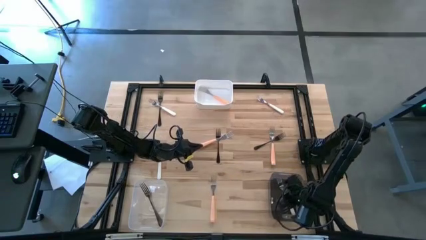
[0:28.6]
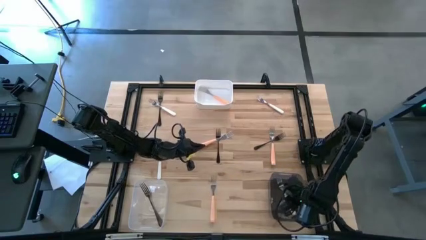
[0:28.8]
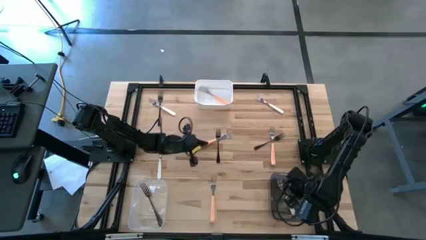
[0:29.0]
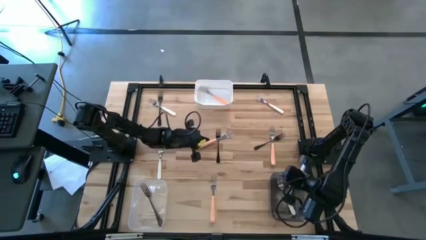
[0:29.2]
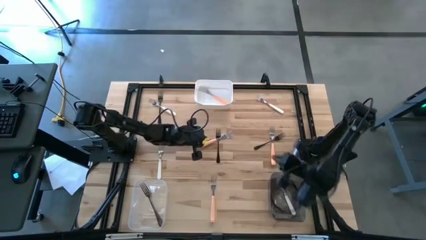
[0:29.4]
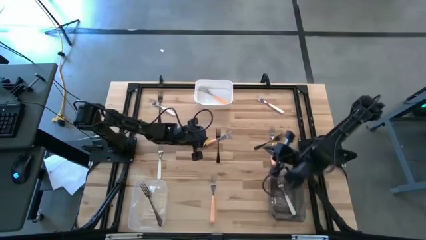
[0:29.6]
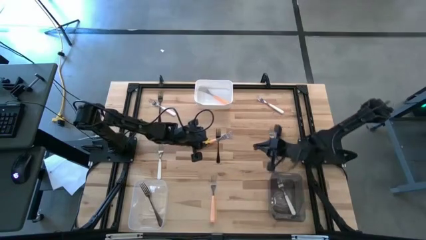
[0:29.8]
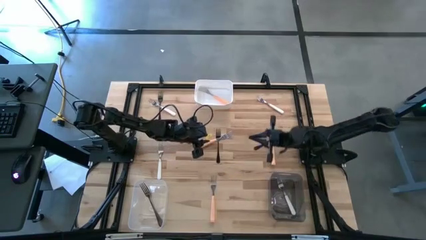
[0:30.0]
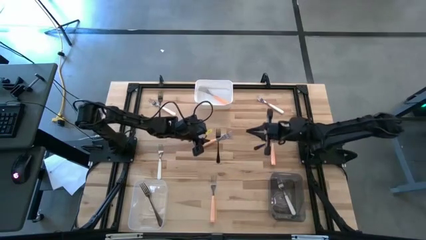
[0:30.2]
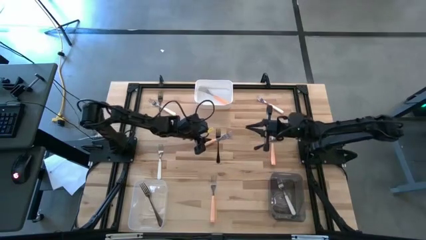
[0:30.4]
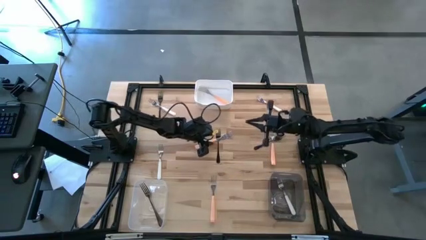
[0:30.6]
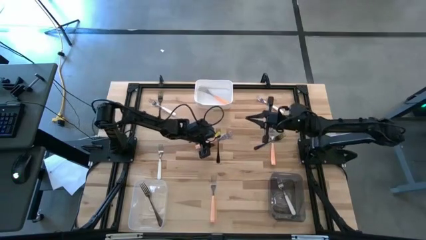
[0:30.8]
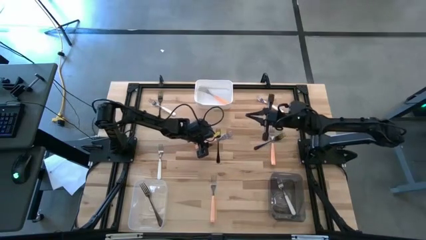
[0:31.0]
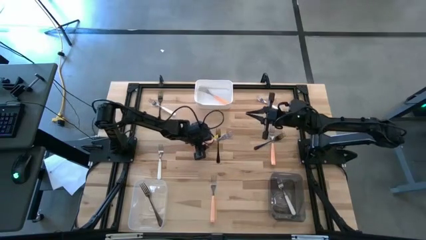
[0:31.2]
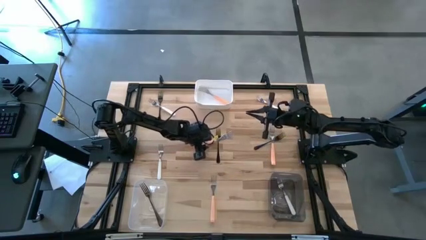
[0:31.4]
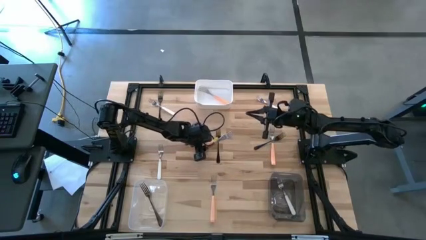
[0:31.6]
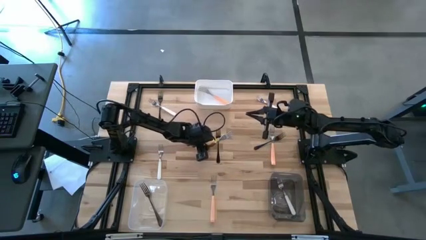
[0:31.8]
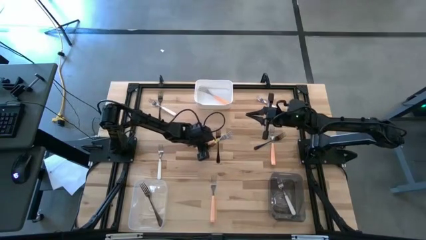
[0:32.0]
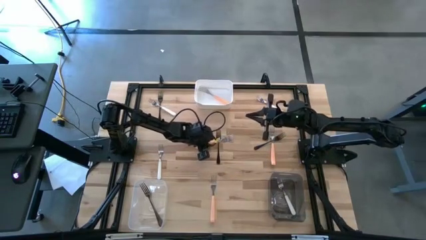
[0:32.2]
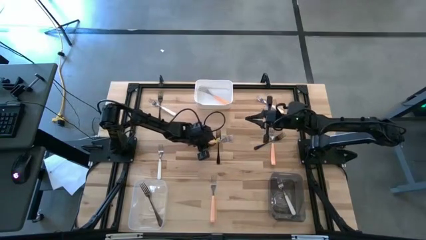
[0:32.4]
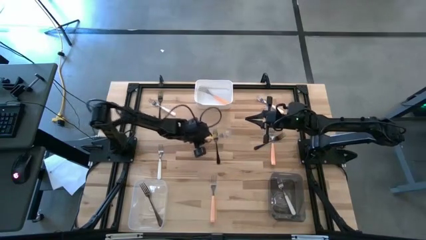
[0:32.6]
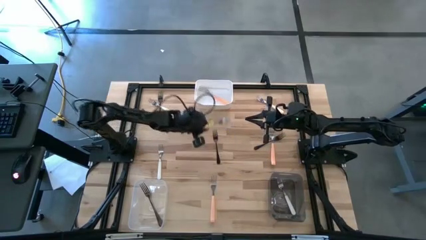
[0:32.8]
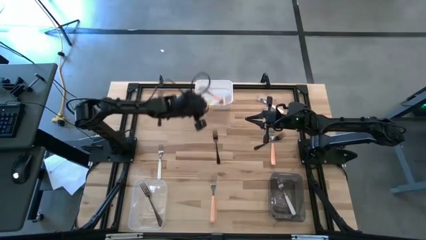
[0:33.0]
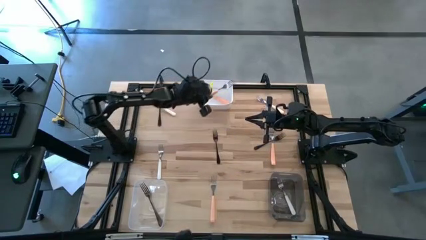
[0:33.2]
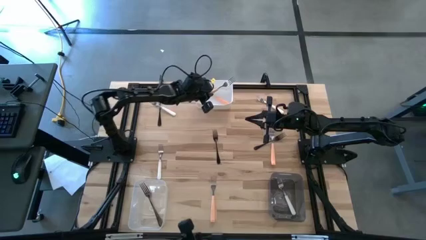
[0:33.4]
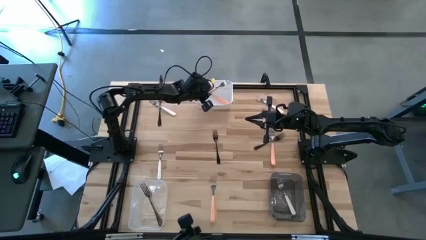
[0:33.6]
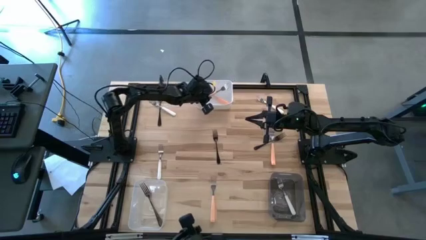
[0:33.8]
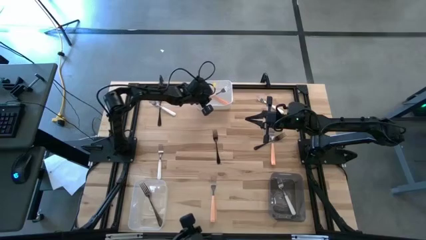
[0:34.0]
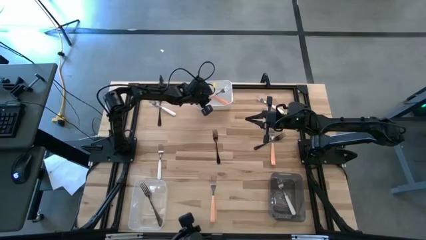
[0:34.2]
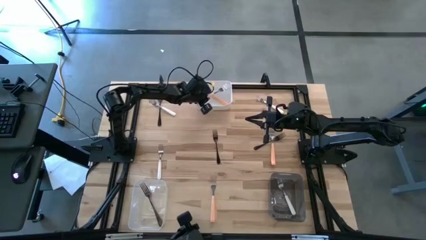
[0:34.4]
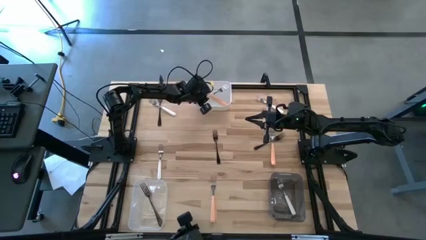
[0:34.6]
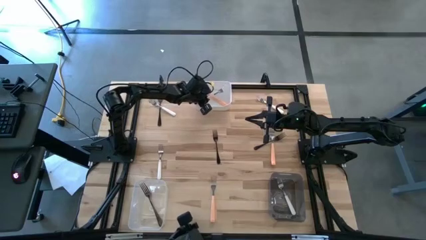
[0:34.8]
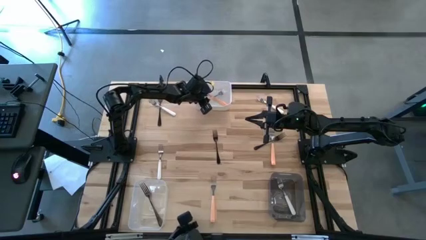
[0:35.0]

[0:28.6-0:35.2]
Task: Sort silverware by color (type)
Put the top left orange fork into the white bin

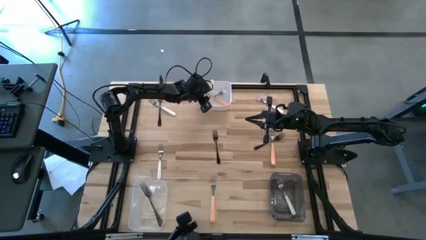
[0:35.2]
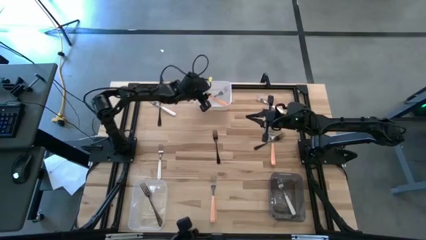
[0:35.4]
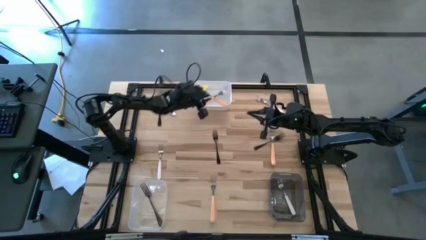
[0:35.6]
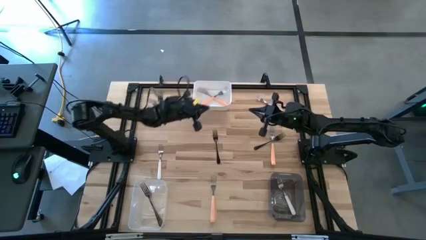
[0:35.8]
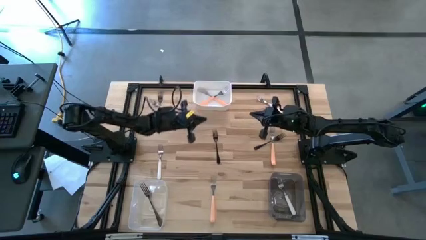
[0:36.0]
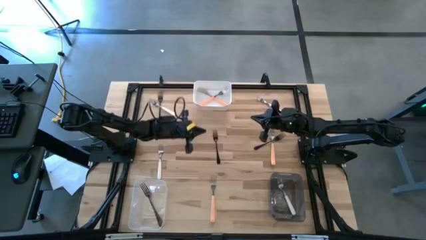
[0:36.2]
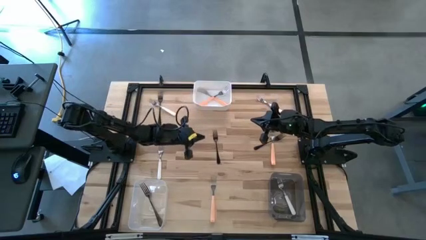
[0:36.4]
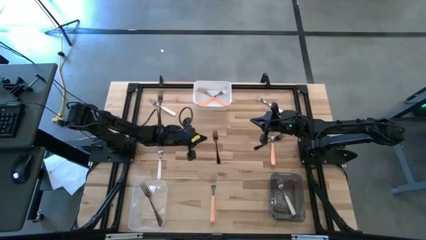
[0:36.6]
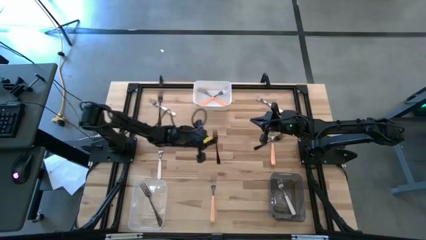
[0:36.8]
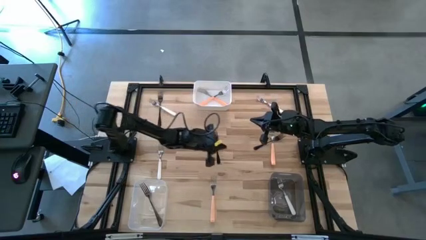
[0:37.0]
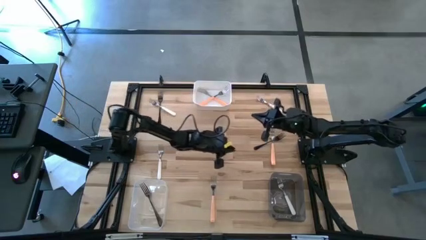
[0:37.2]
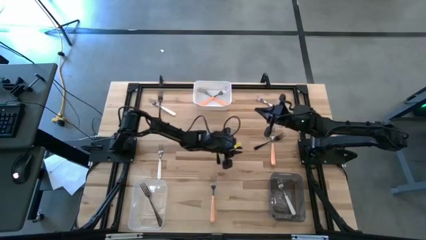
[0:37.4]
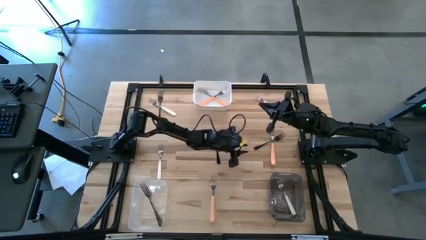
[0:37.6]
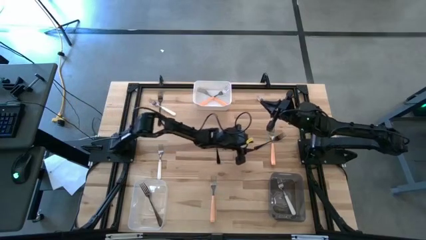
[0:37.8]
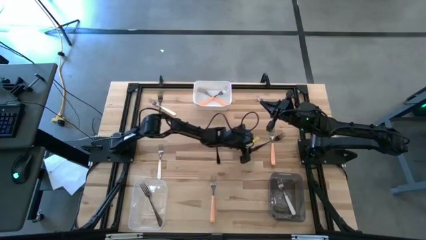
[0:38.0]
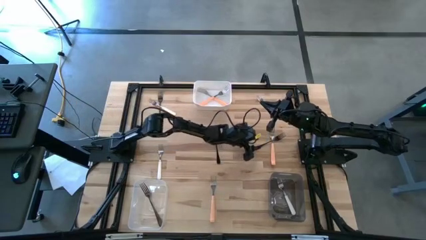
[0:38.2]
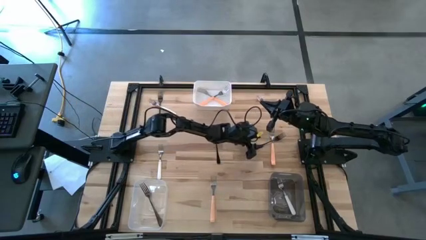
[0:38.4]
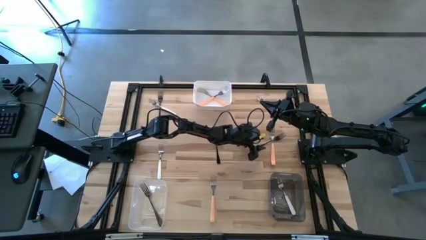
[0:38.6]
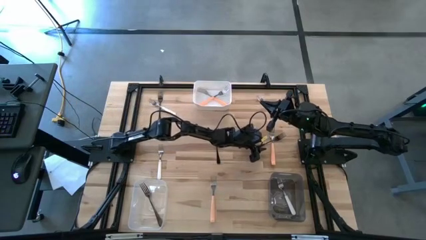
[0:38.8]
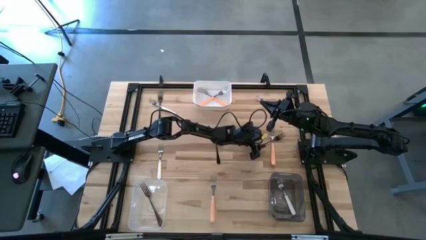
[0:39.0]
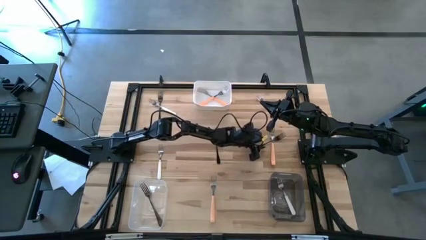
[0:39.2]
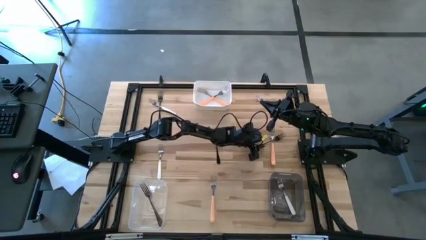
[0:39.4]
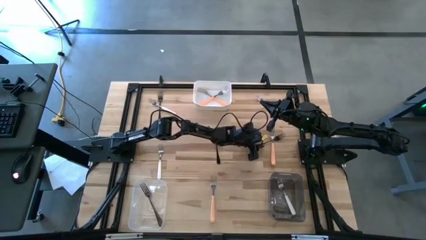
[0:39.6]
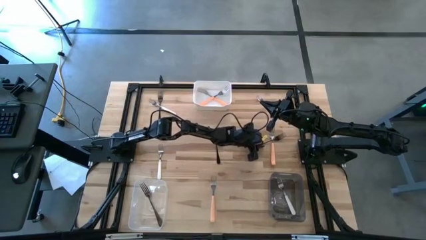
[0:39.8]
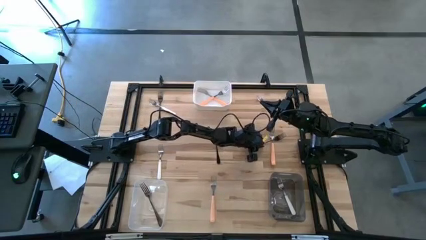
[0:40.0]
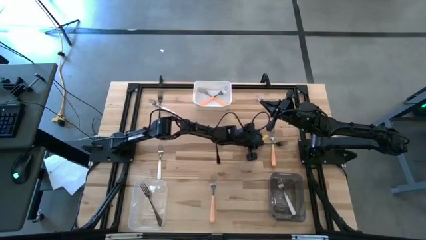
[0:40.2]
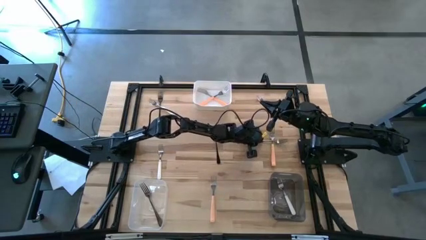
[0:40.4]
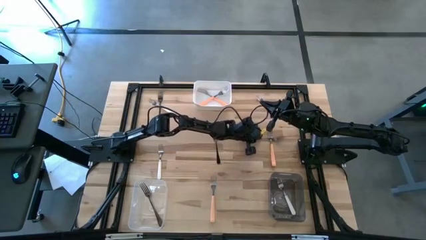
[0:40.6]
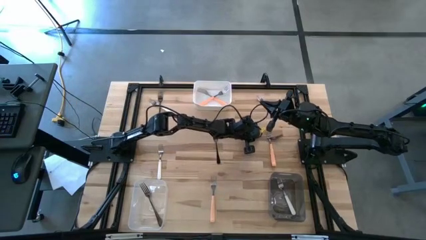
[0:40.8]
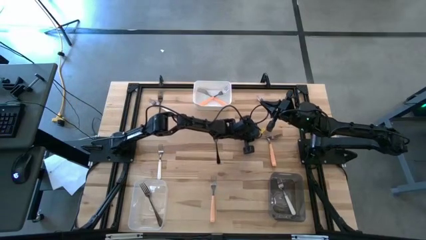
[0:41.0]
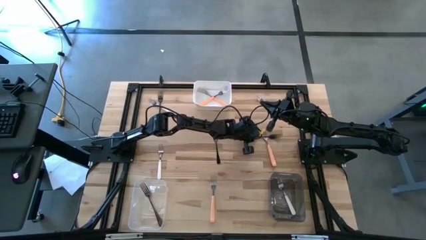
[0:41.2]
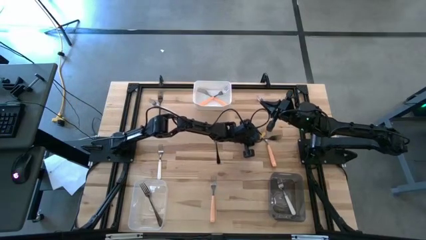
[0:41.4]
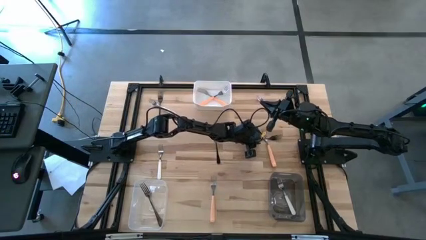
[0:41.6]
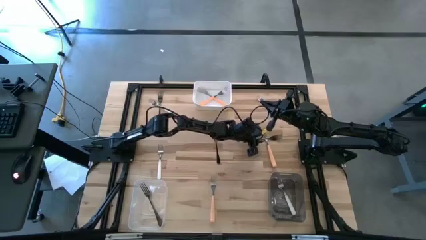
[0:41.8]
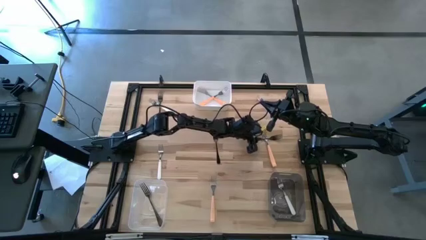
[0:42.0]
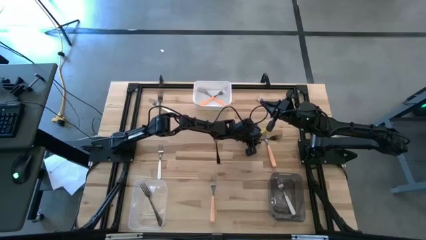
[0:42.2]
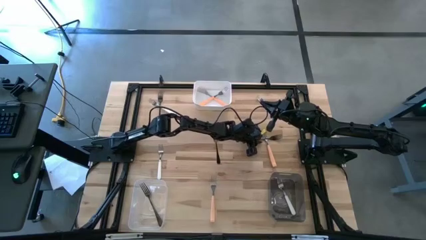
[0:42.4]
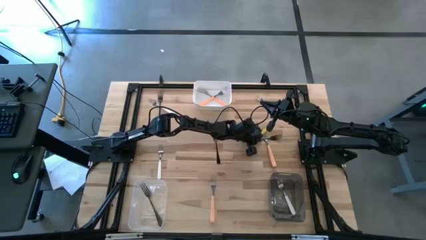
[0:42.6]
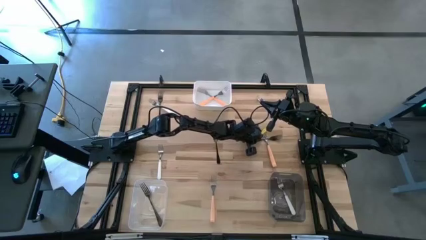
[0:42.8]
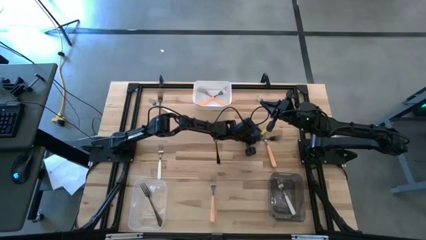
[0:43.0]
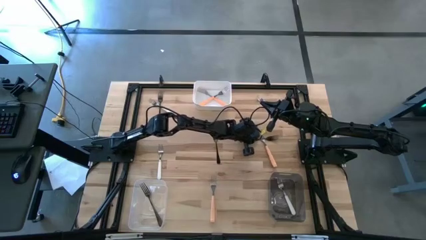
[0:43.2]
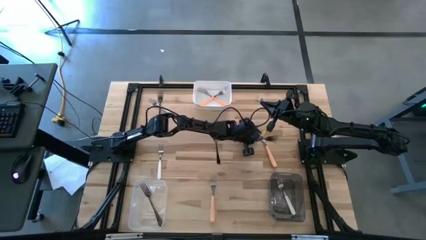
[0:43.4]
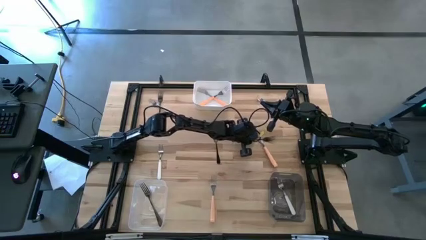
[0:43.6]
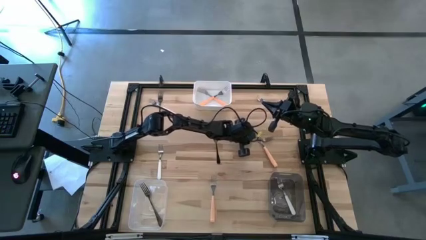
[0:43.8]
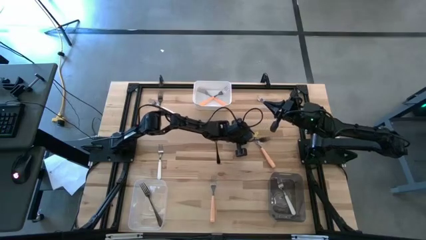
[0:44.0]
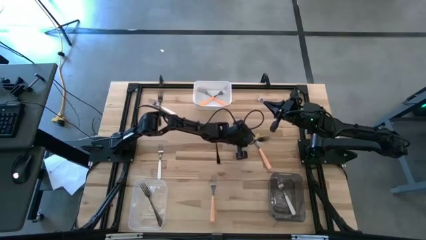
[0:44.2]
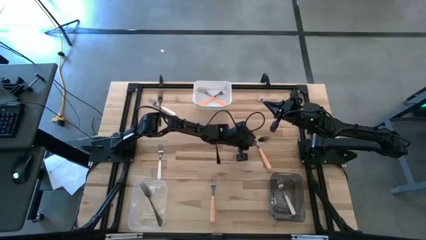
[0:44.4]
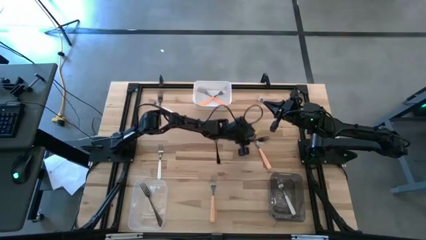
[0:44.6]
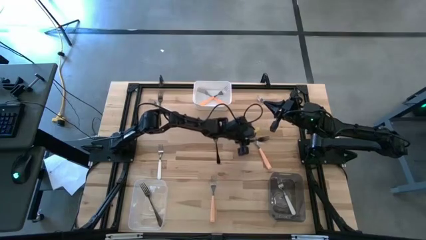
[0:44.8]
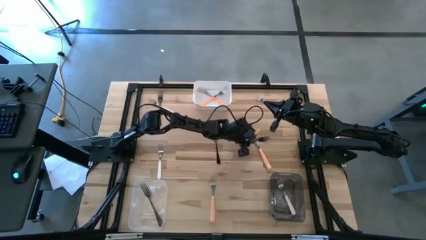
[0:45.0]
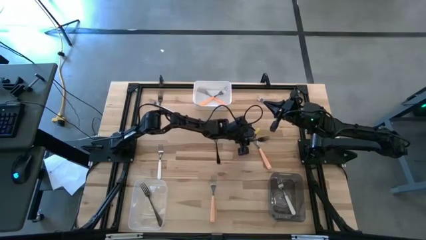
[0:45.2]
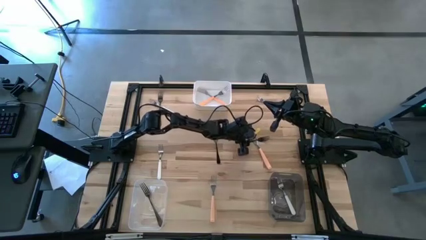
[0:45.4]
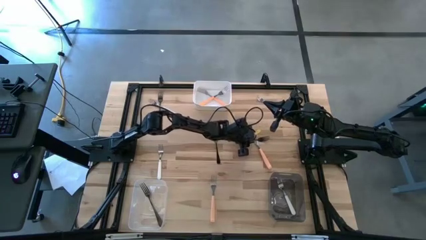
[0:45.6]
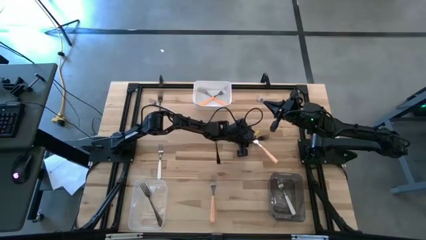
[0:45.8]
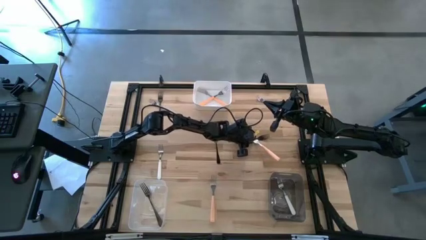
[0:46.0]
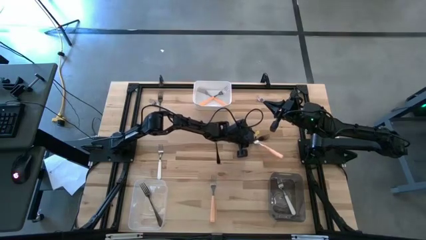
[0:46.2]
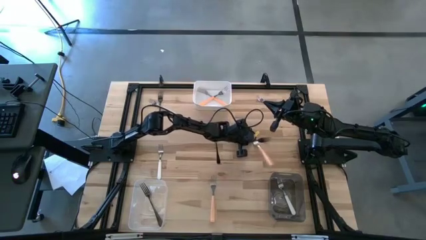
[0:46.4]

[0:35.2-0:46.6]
Put the middle right silver fork into the transparent bin
